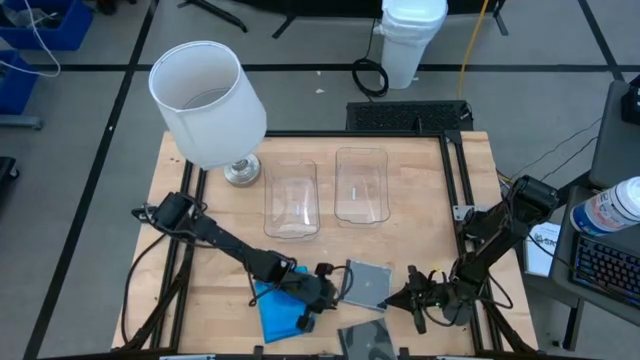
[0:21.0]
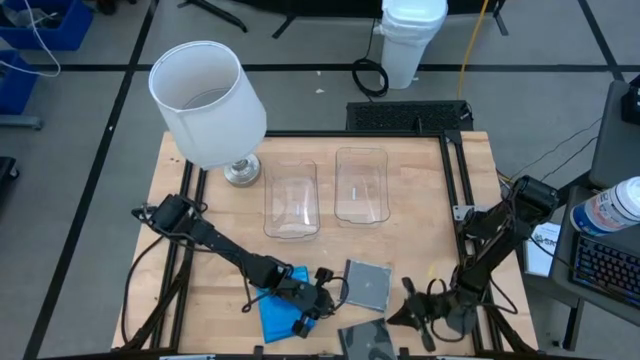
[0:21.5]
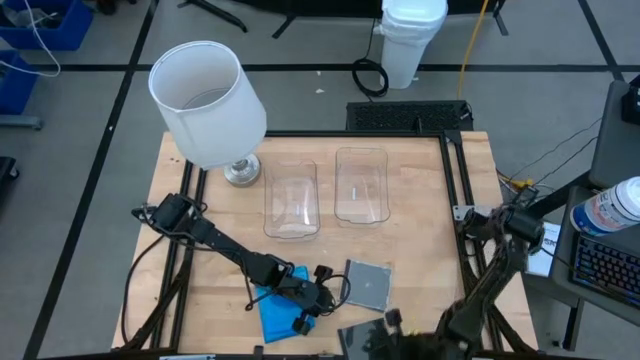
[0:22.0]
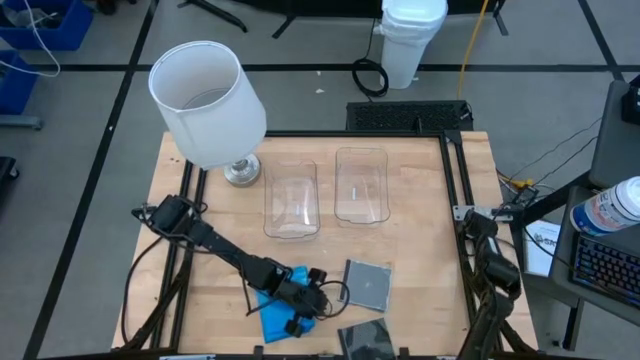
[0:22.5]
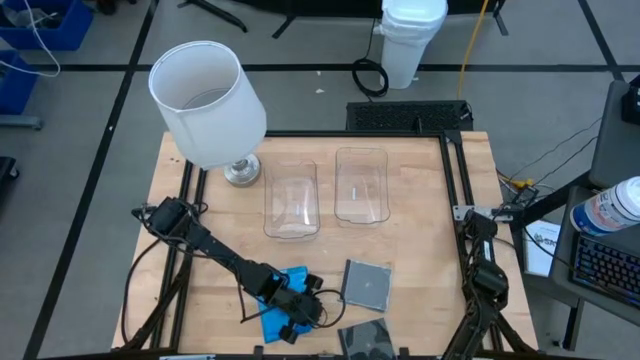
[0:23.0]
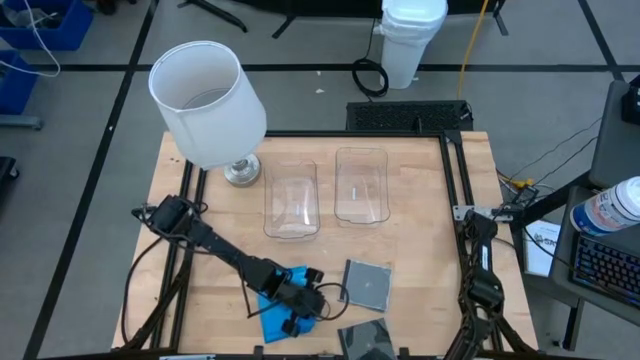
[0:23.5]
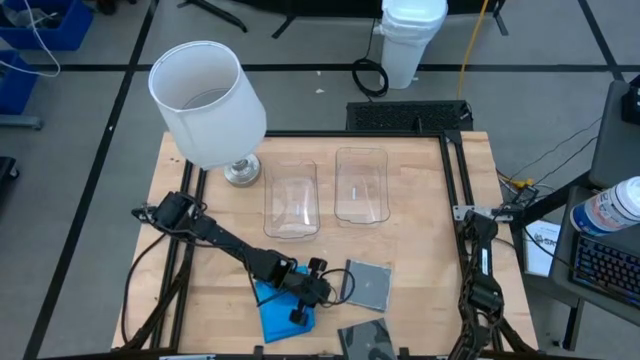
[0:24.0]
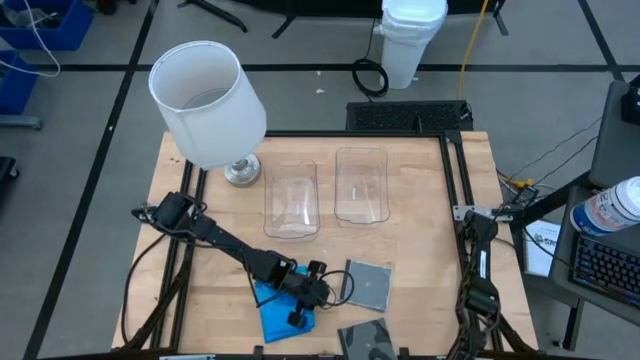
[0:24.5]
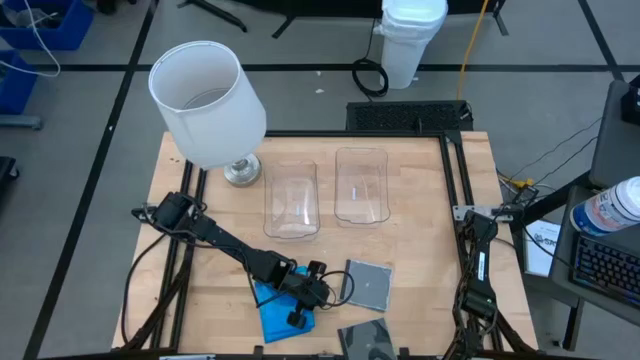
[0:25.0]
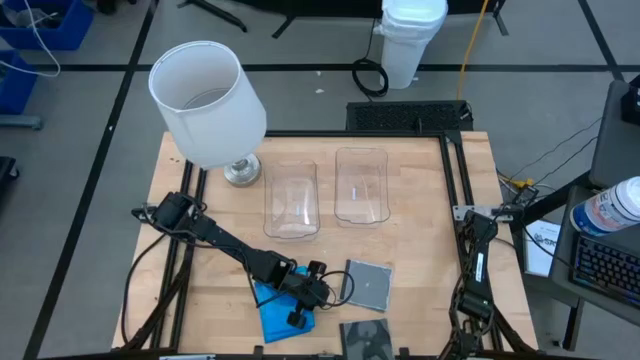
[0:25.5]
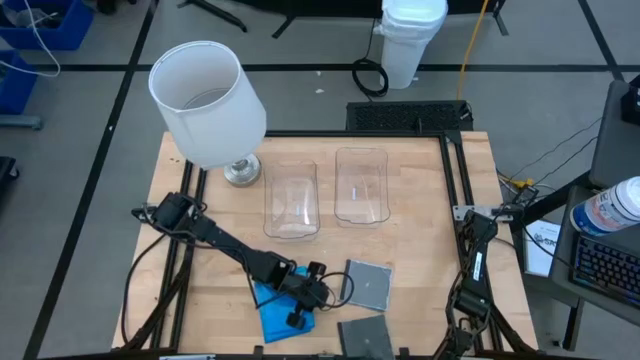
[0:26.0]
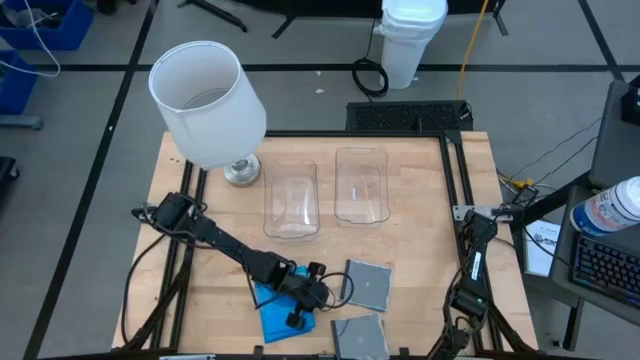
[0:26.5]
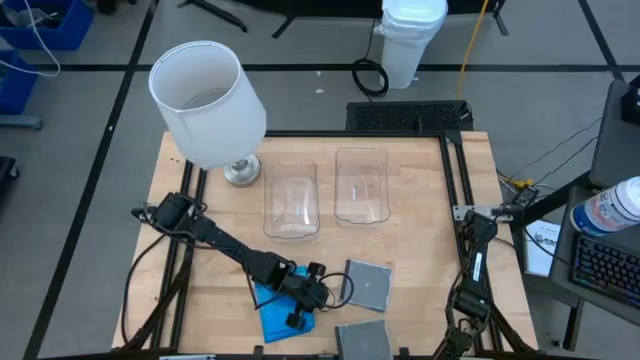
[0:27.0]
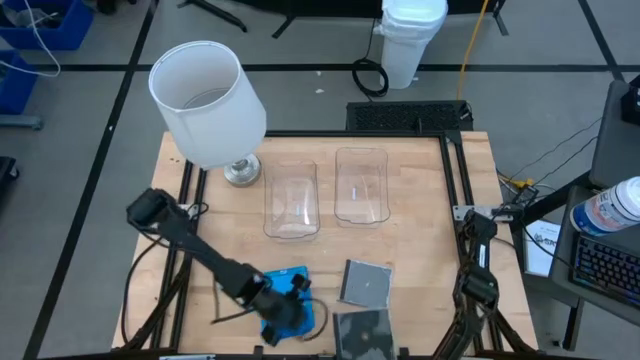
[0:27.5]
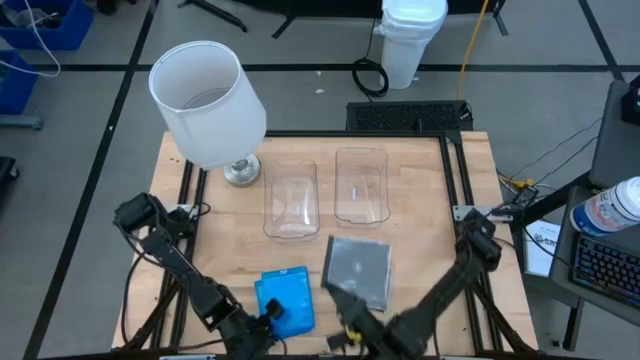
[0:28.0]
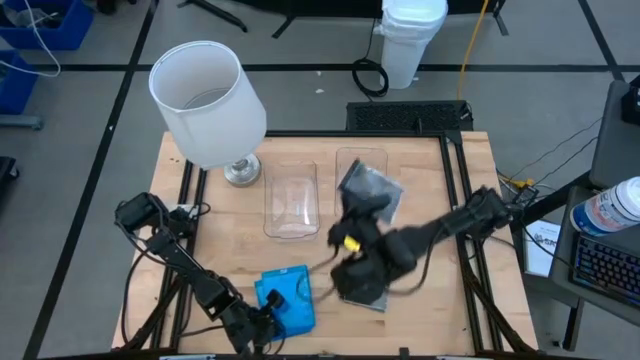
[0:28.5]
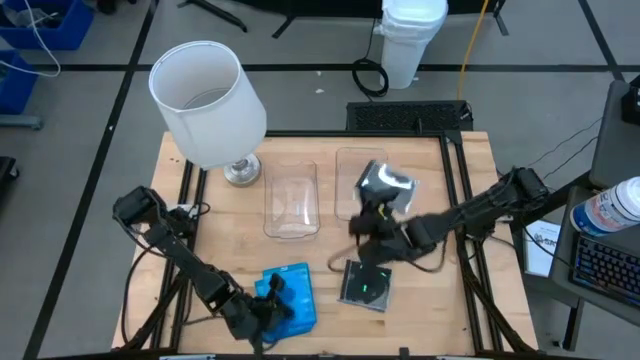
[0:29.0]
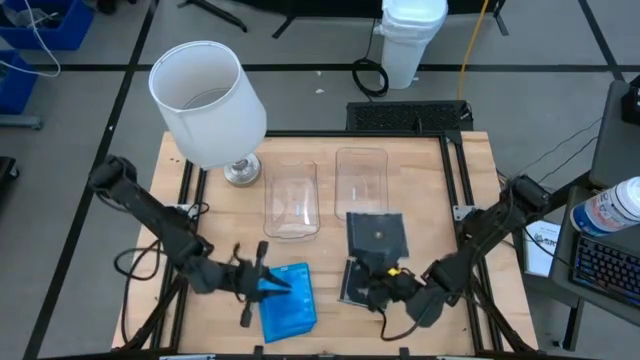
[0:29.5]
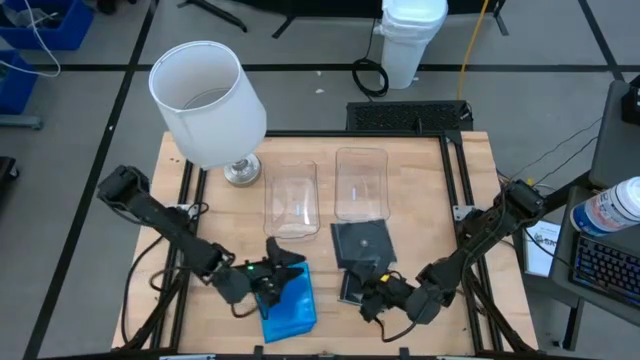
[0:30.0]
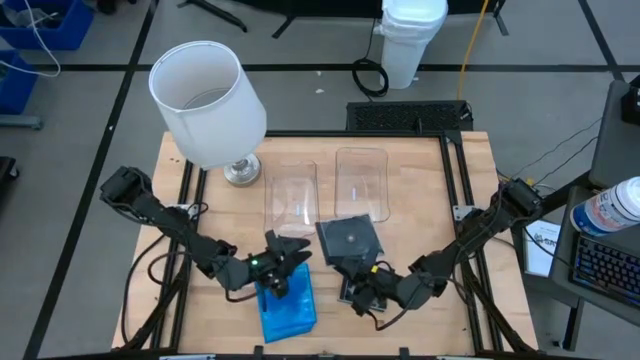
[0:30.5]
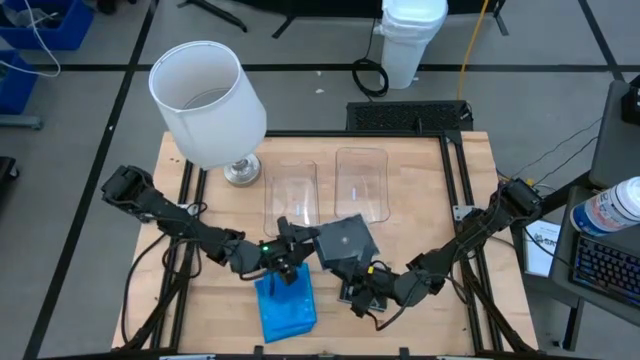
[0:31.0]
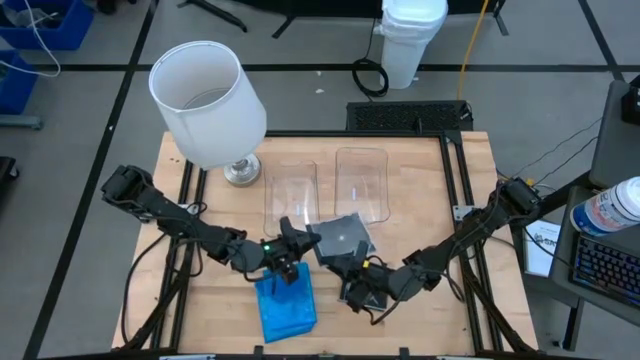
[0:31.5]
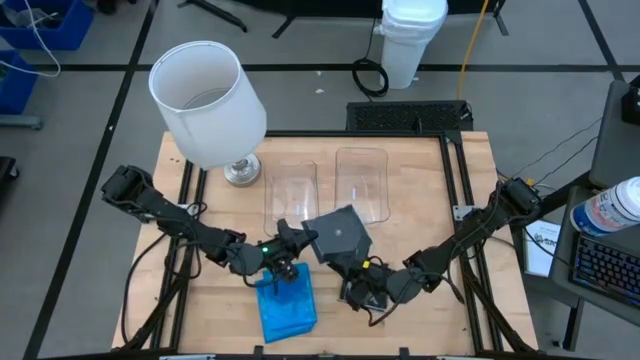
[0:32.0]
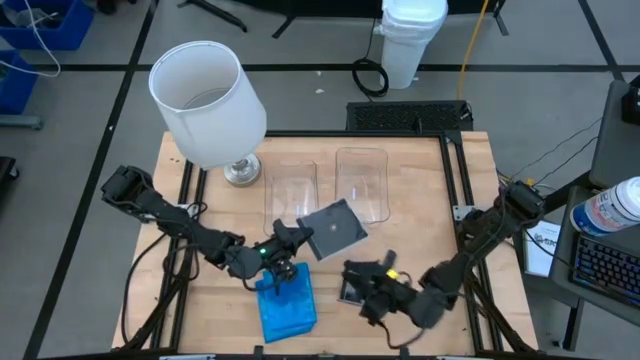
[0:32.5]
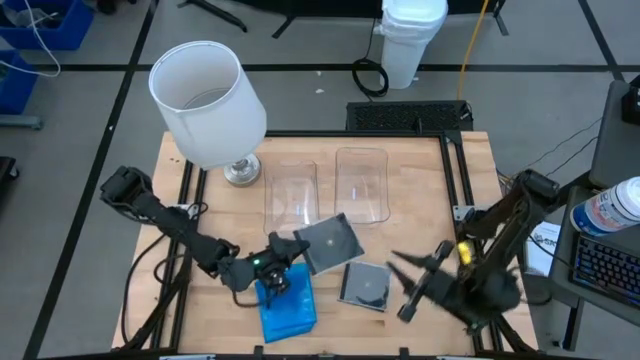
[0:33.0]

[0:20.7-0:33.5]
Task: Pick & place jewel cases by type
Put the black CD case into the right transparent bin

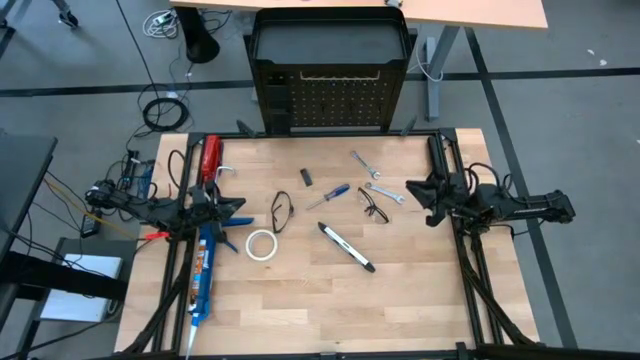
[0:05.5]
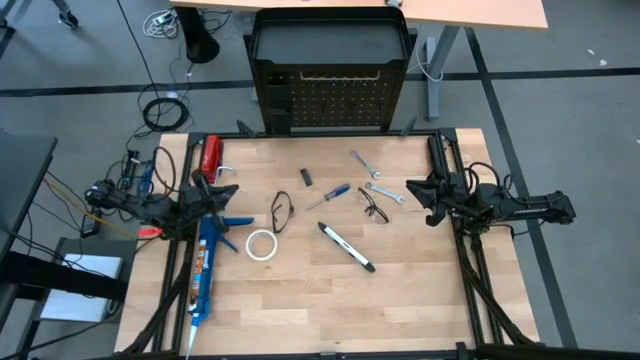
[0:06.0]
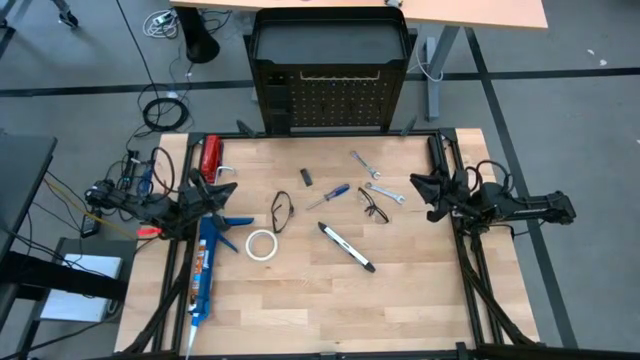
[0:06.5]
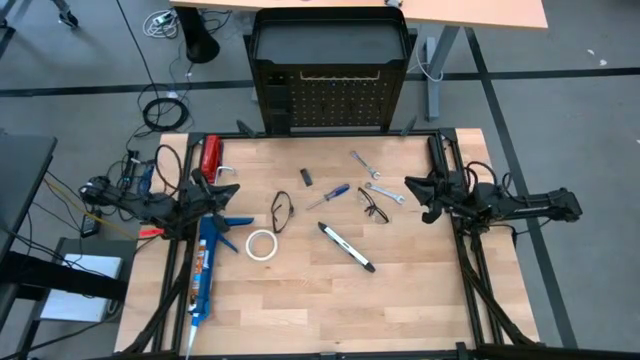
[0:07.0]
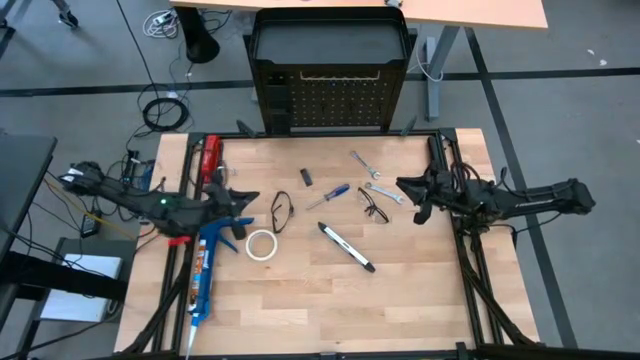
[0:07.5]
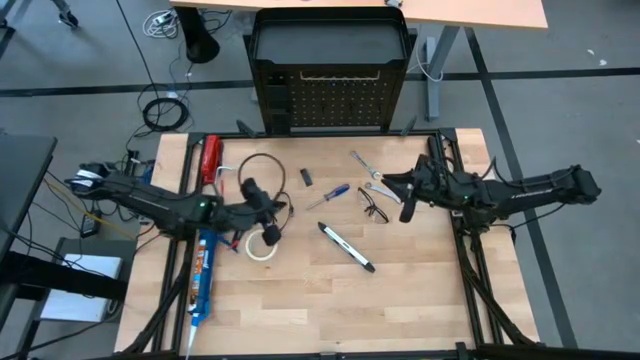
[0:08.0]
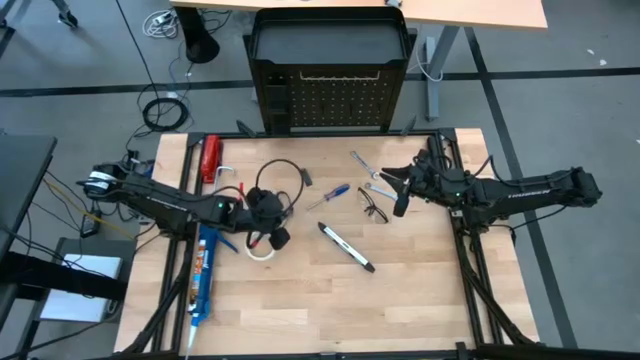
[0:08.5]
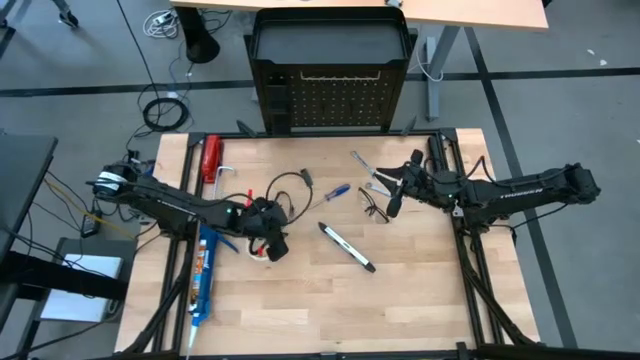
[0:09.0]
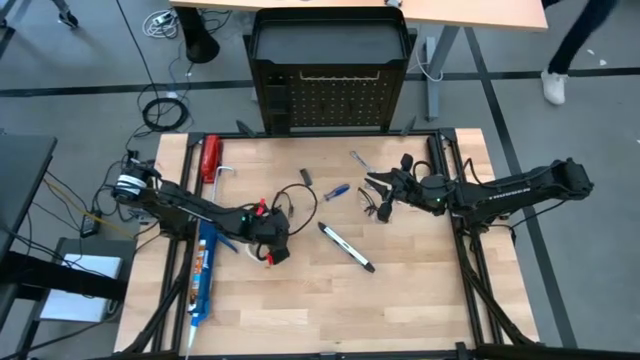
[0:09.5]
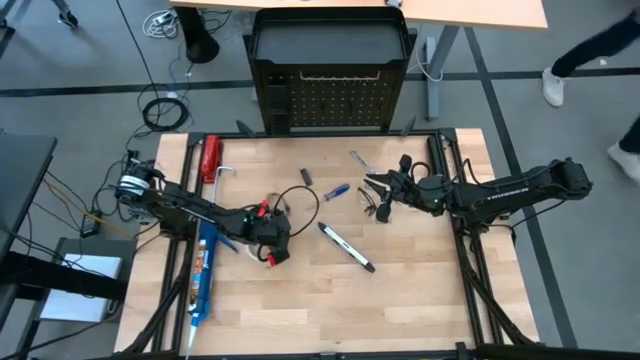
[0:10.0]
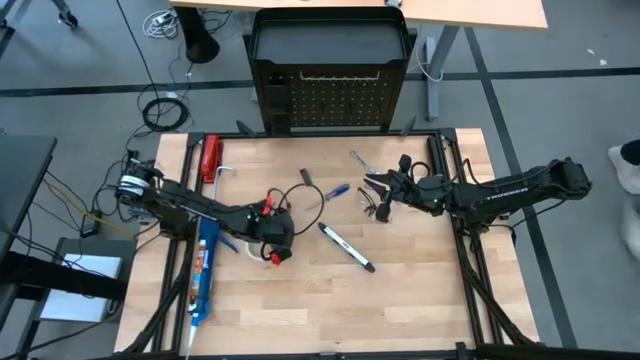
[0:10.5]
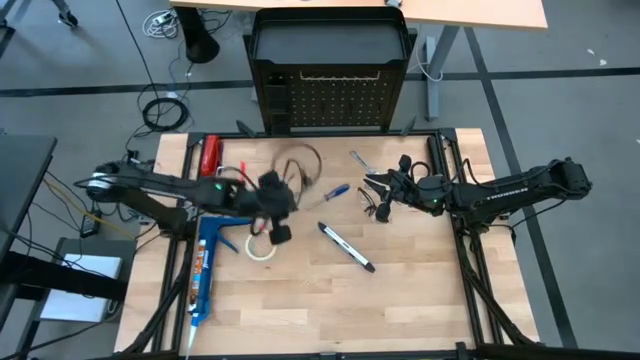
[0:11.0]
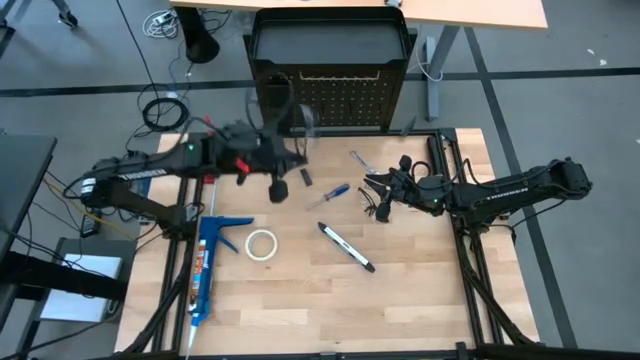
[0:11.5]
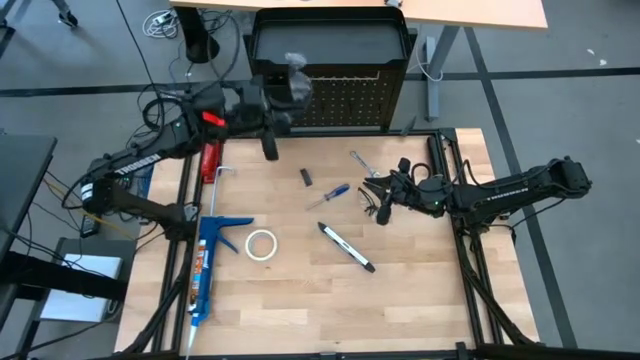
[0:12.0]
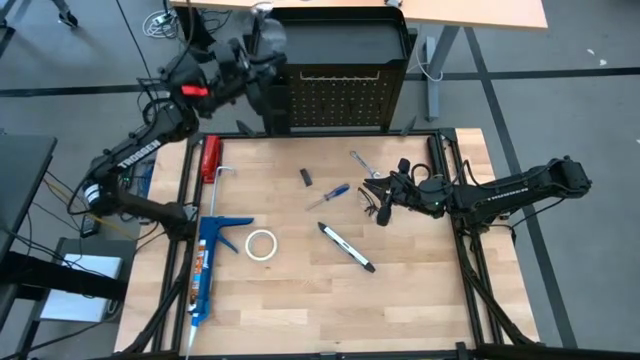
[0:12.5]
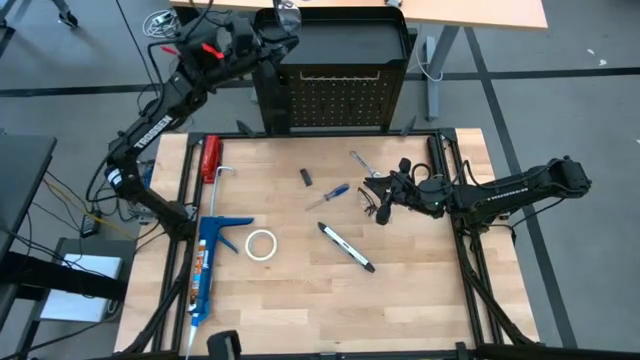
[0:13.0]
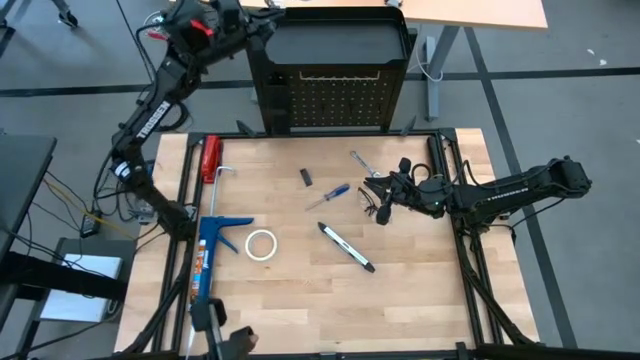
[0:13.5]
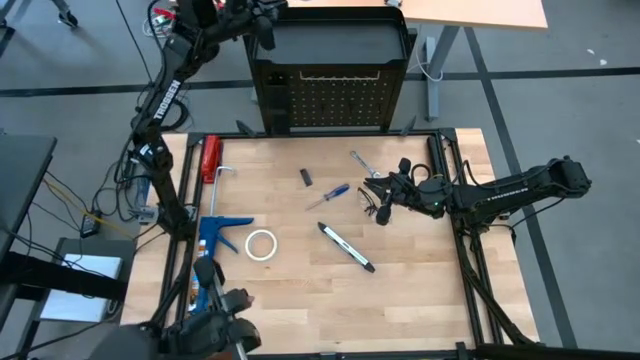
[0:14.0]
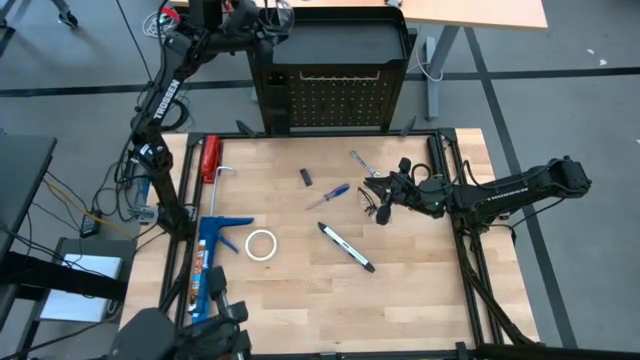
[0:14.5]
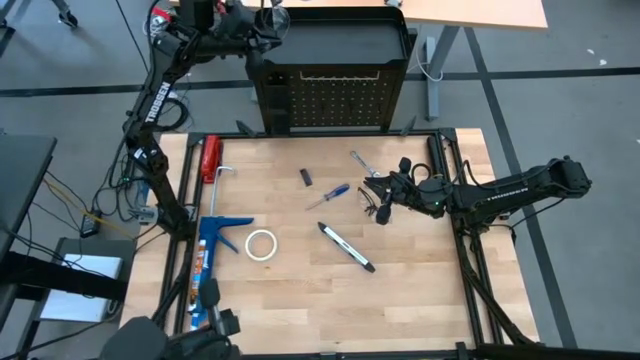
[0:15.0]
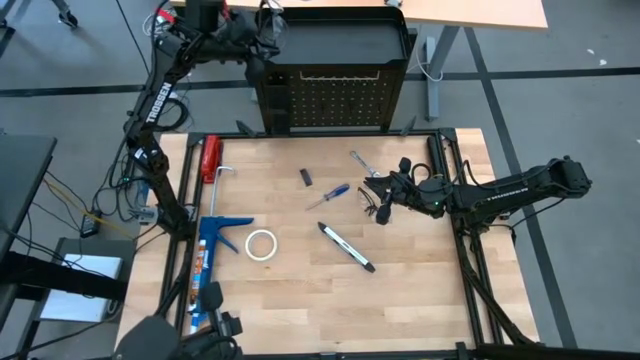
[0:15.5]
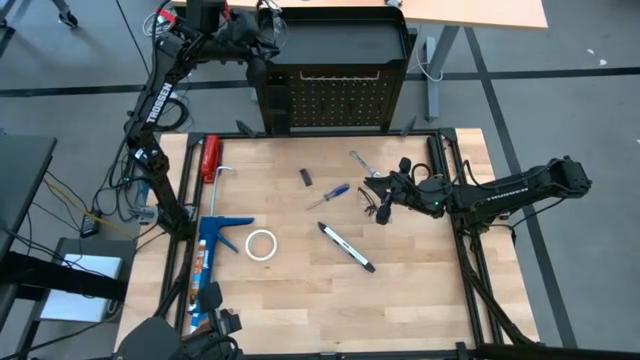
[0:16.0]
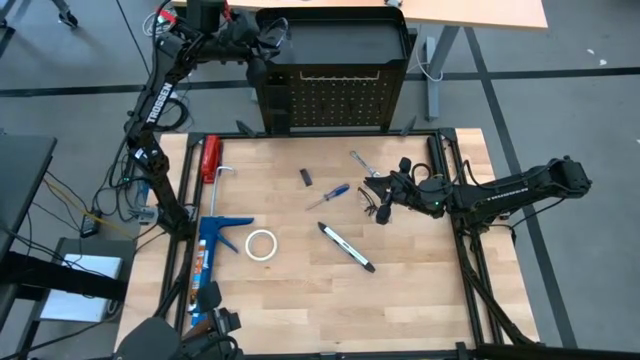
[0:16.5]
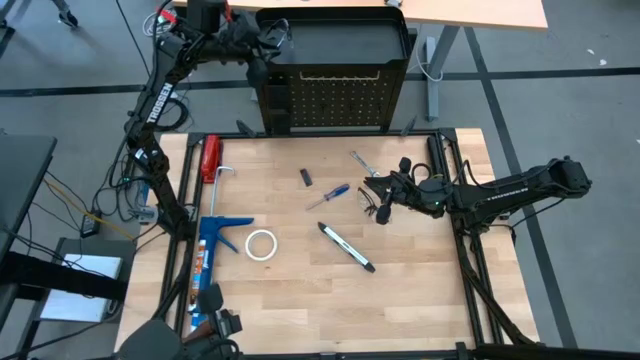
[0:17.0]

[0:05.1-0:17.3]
Task: Hang tools onto peg board
Put the left black safety glasses on the top of the black pegboard
